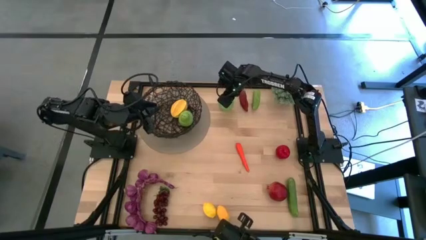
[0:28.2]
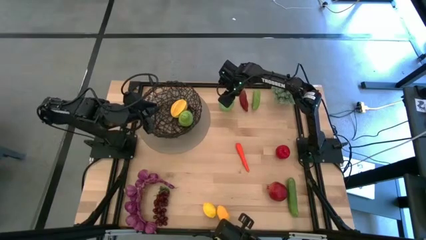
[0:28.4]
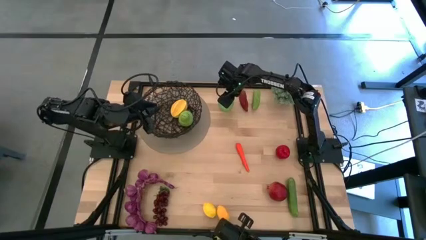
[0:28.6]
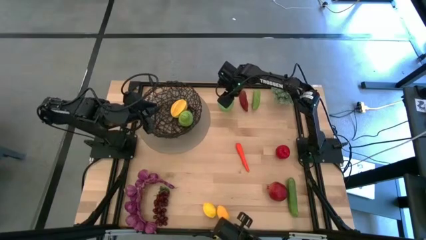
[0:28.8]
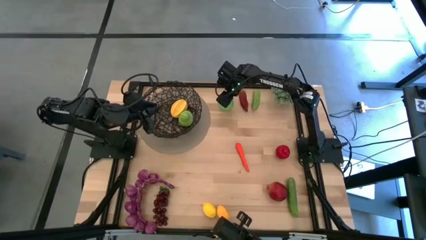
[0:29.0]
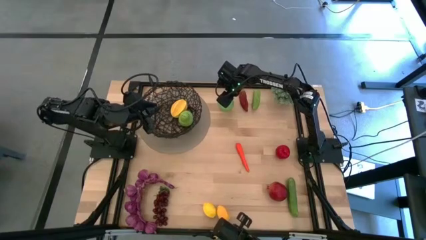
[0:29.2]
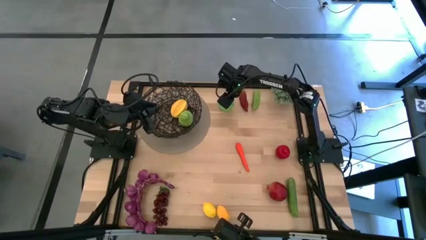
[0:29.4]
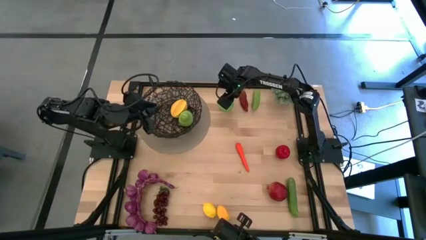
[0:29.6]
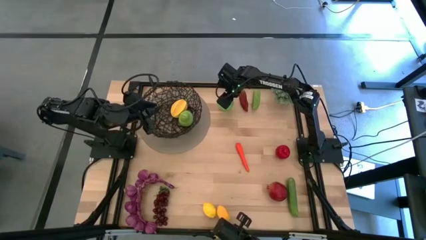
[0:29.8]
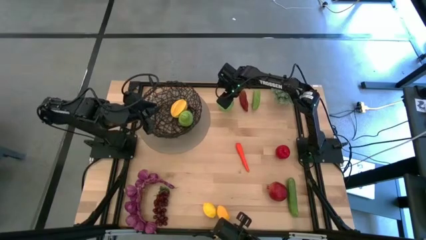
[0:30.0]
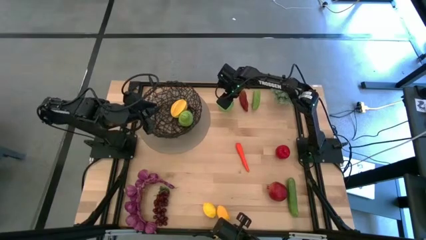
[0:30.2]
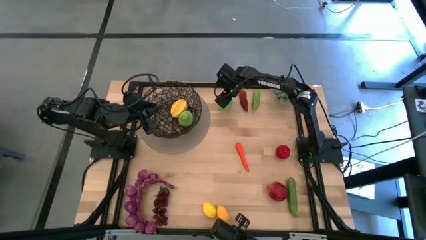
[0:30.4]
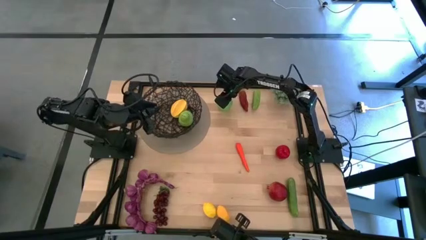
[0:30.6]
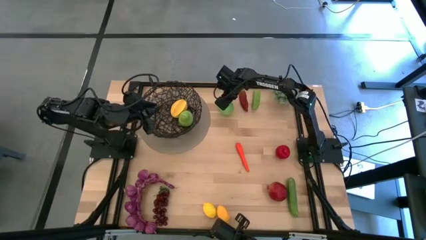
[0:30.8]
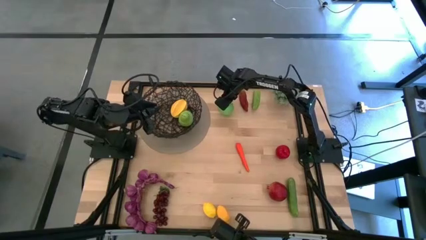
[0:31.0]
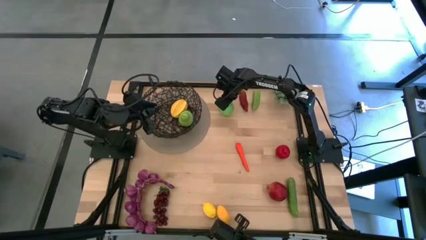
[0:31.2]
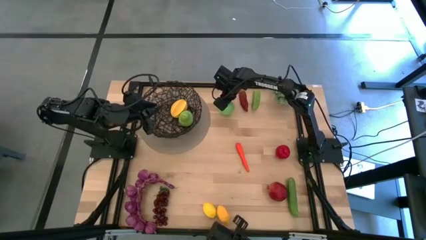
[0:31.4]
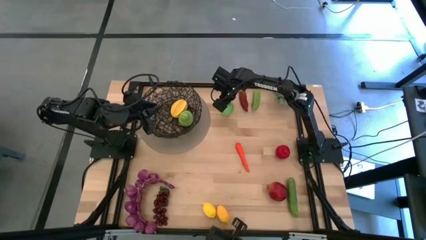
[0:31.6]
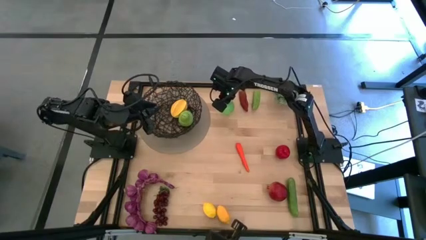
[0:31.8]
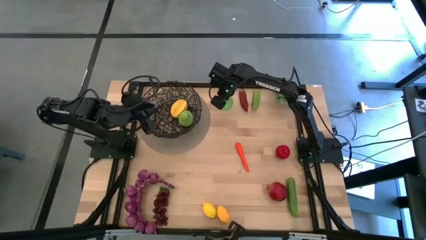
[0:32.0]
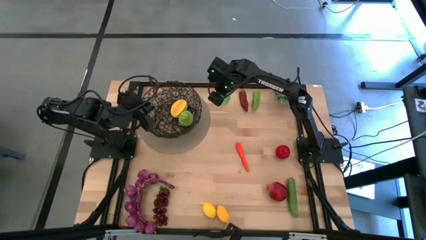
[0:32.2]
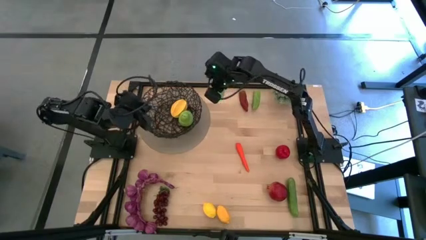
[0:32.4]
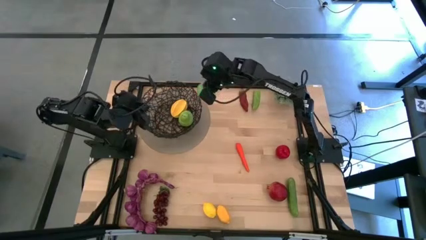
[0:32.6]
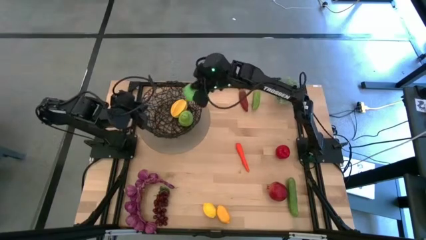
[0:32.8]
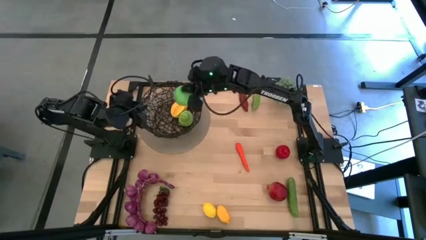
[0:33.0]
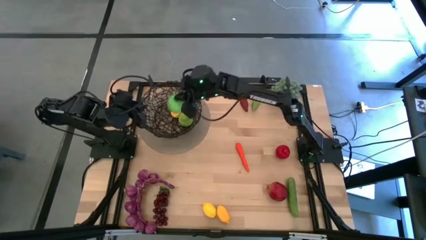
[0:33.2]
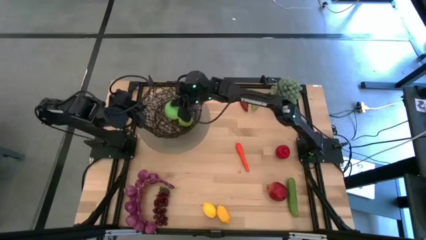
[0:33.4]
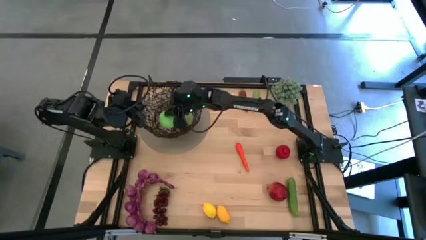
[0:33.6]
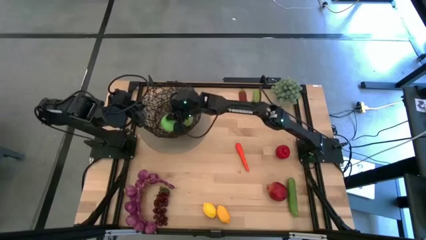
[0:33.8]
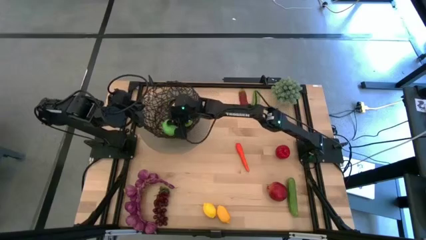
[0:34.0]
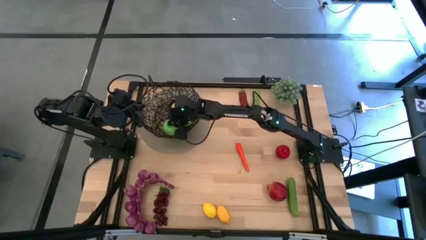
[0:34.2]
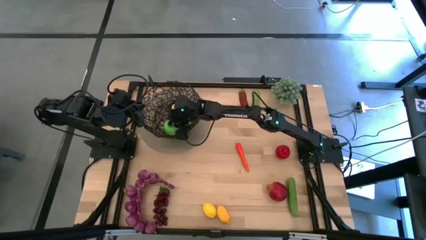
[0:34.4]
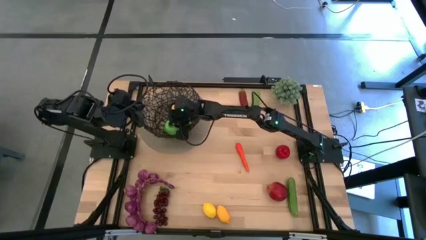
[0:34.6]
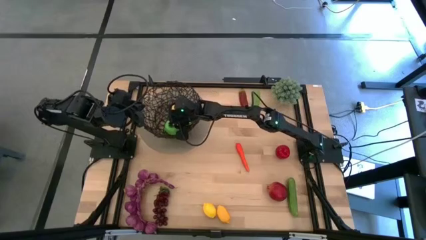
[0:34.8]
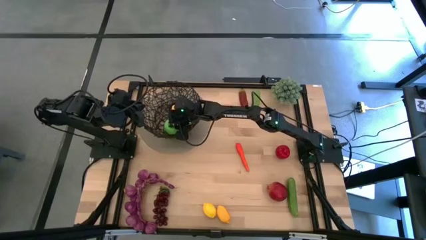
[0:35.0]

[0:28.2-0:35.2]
Task: Build produce basket
Put the green apple into the black wire basket

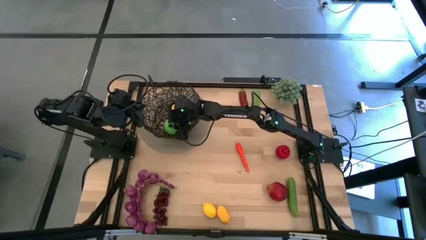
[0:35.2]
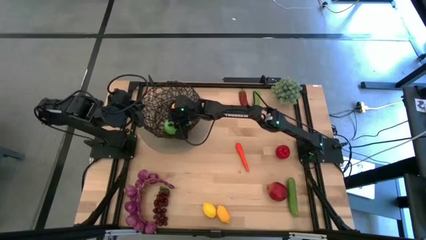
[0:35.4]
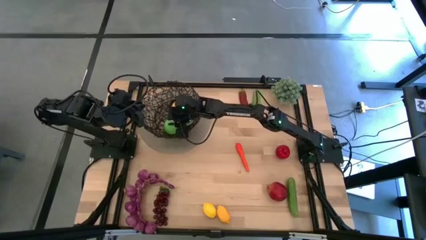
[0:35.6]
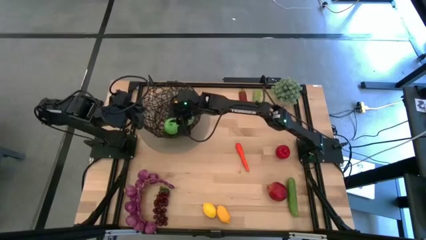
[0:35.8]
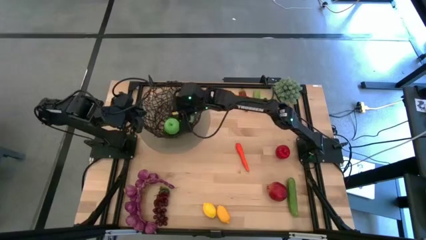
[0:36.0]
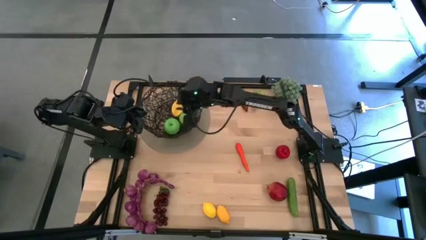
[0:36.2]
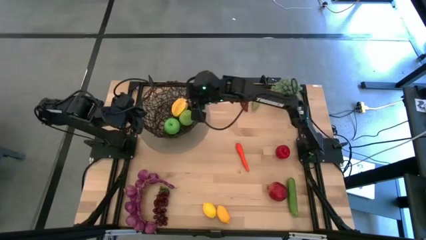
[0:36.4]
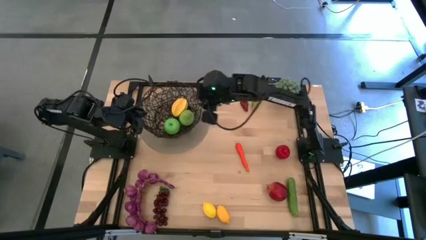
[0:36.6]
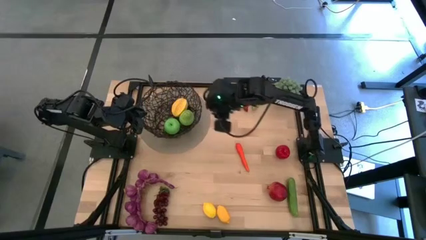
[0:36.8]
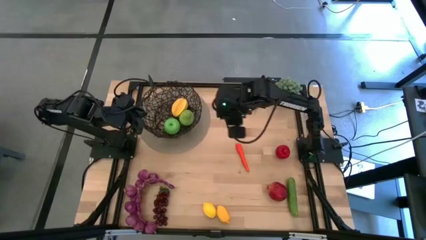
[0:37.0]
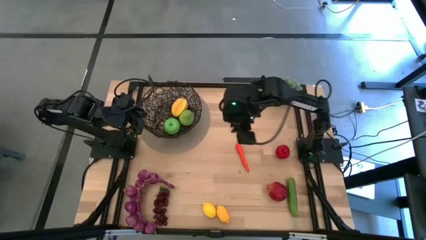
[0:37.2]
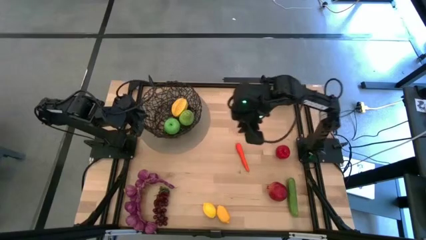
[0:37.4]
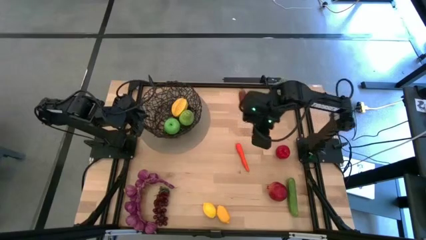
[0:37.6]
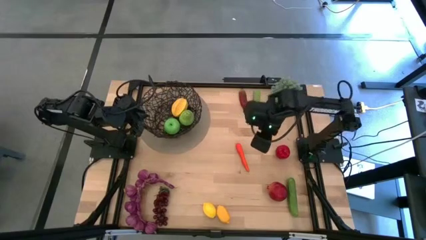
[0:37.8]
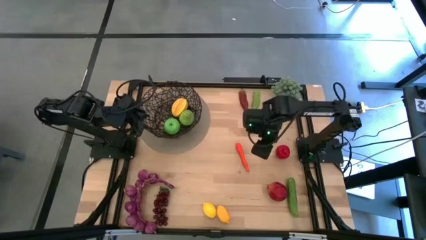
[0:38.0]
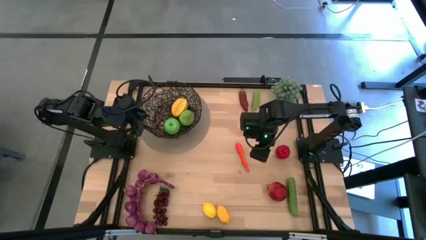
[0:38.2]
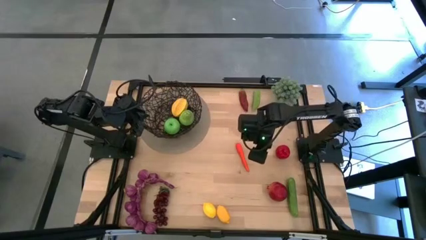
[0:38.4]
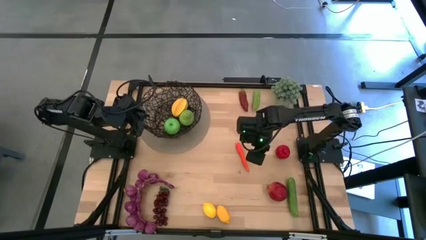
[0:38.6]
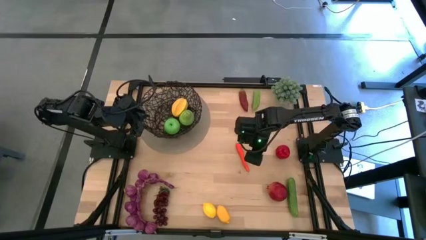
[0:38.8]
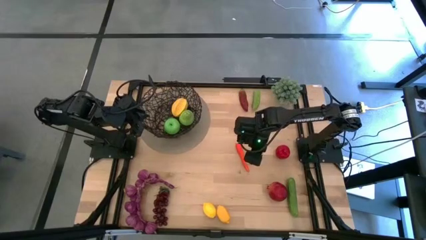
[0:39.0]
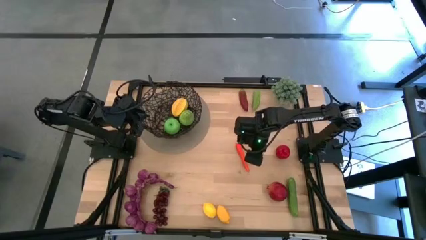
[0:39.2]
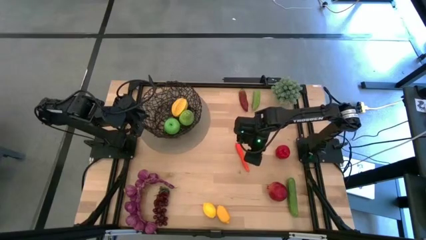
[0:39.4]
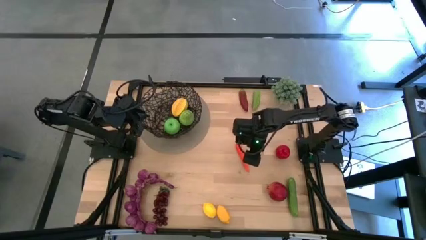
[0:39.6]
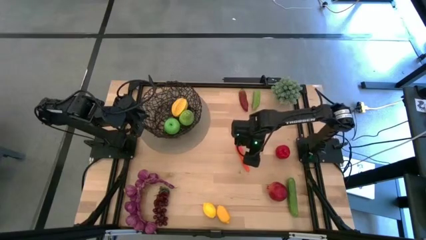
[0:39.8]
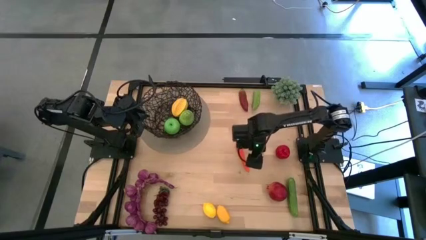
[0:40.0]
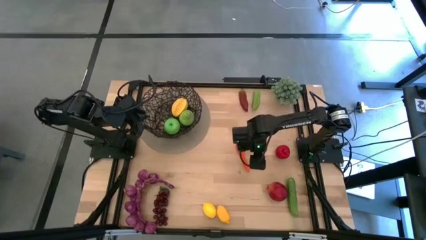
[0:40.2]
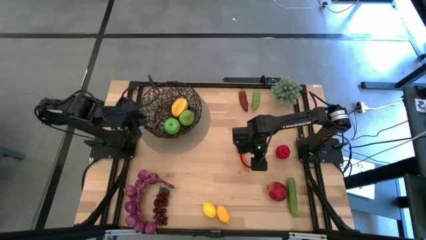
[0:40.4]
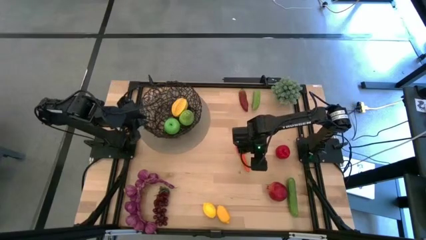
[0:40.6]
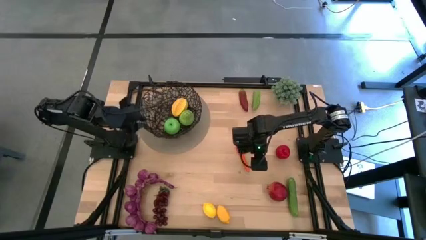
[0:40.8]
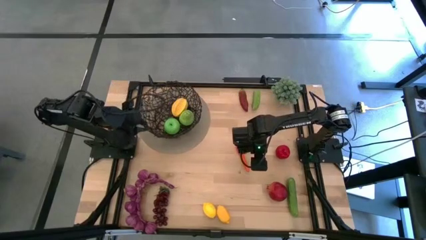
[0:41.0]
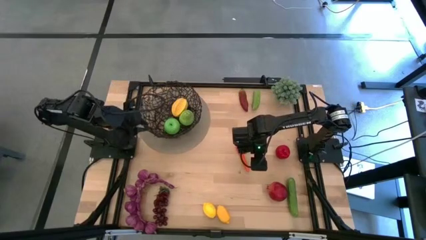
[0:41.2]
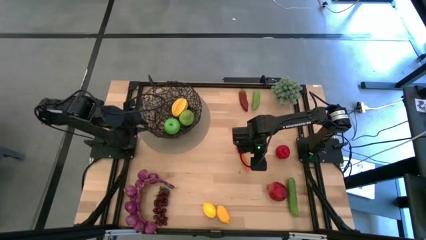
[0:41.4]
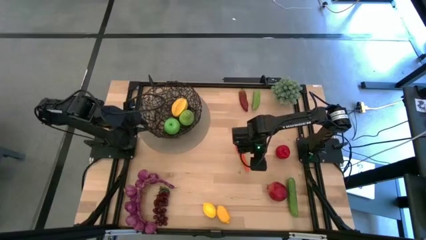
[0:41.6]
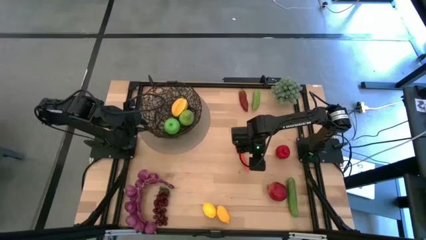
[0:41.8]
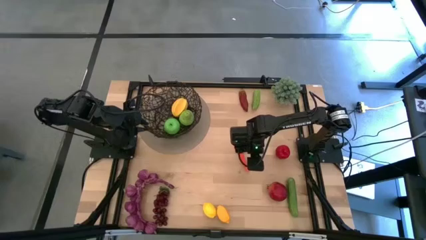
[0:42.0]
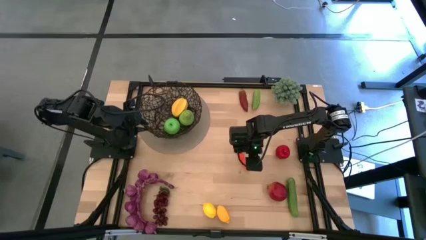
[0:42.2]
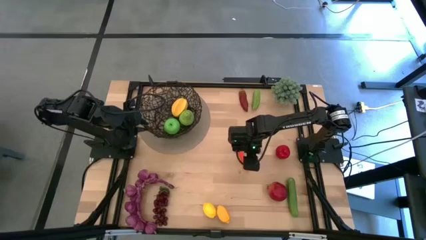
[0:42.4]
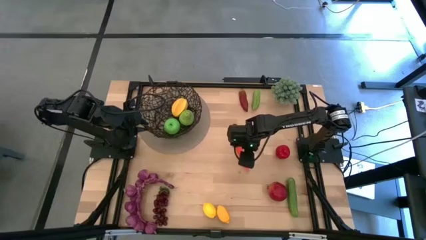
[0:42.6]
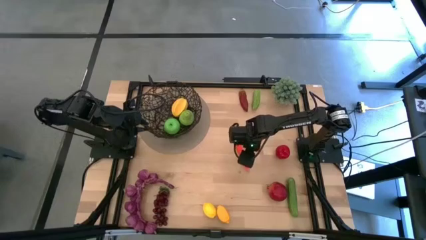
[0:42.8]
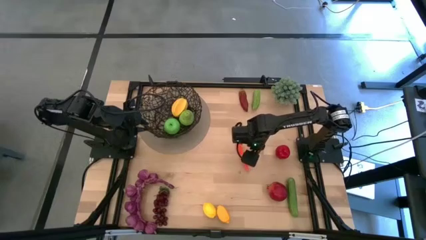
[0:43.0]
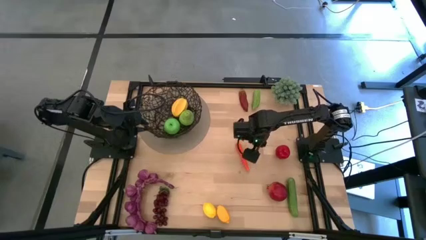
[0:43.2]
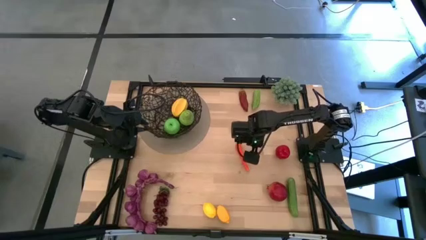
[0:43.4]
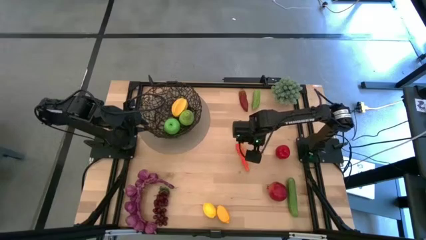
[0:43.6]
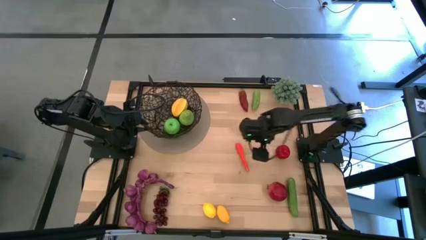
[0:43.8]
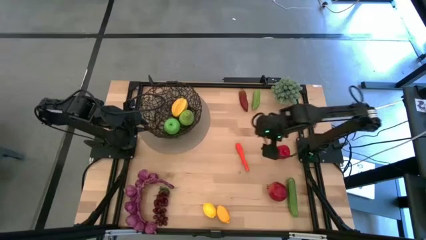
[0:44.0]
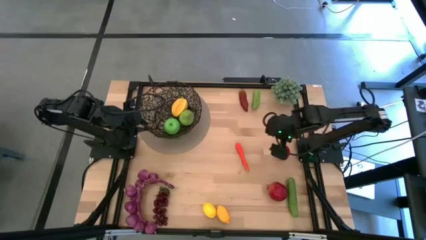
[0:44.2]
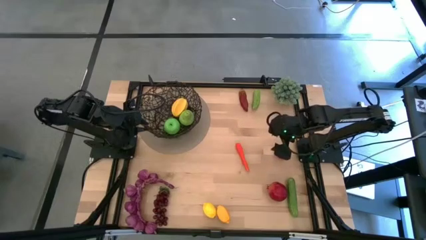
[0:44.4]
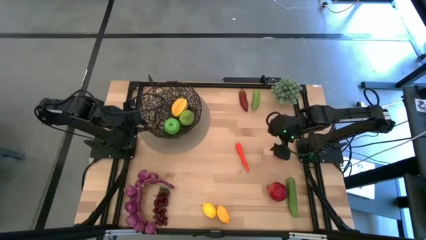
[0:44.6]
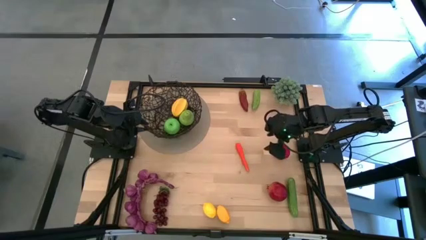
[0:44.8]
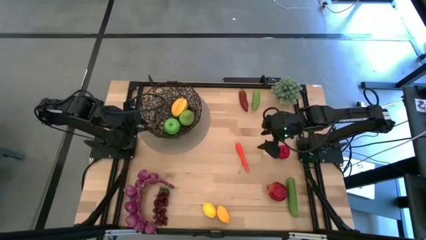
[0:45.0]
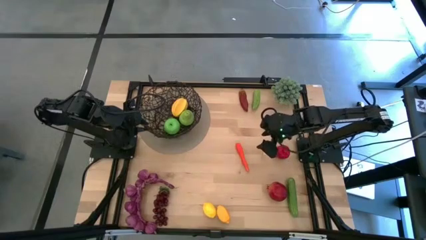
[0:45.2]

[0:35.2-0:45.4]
Put the red apple into the black wire basket
